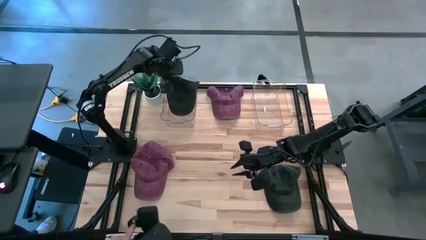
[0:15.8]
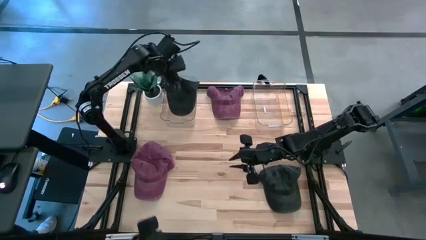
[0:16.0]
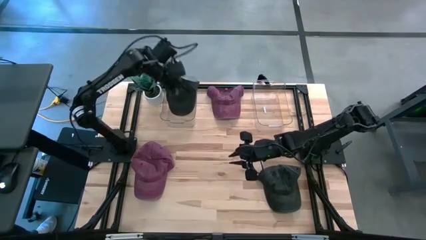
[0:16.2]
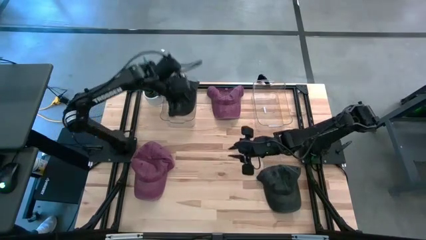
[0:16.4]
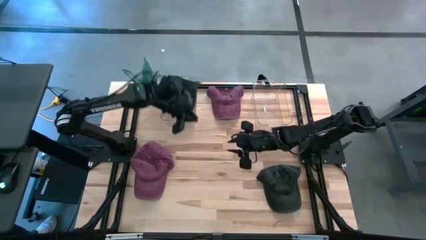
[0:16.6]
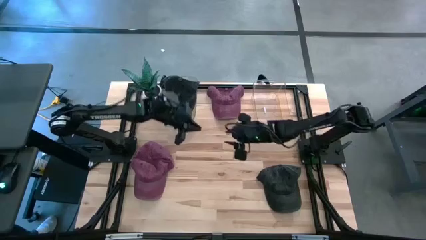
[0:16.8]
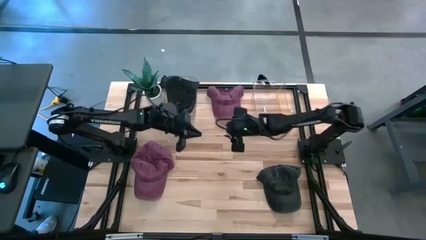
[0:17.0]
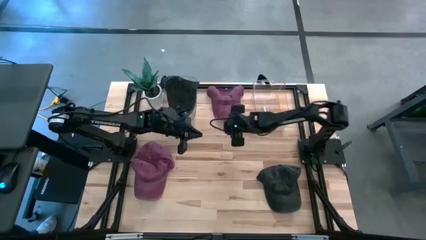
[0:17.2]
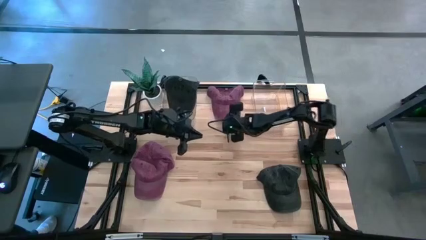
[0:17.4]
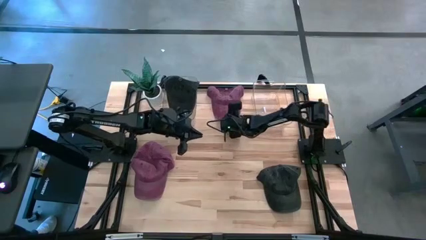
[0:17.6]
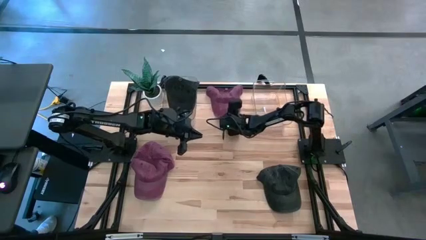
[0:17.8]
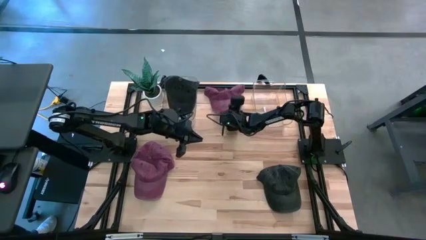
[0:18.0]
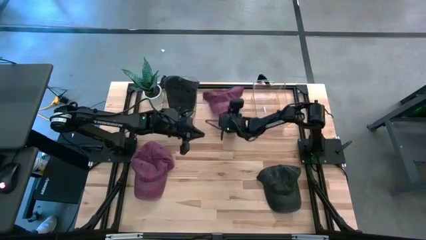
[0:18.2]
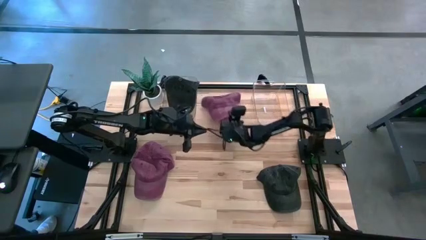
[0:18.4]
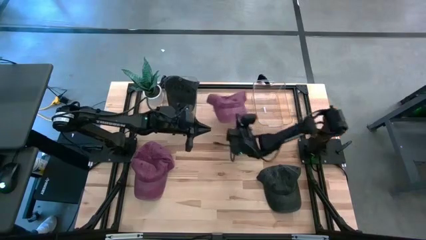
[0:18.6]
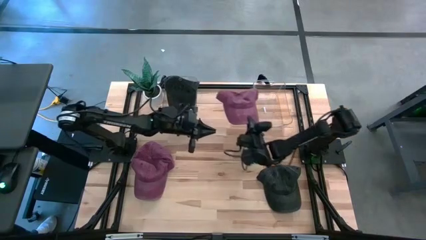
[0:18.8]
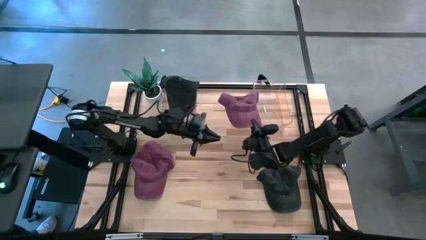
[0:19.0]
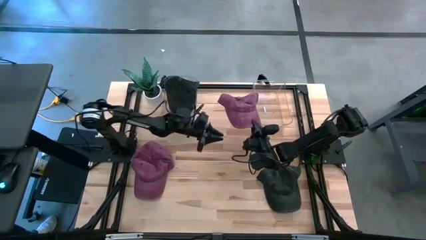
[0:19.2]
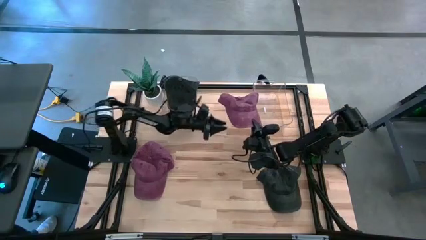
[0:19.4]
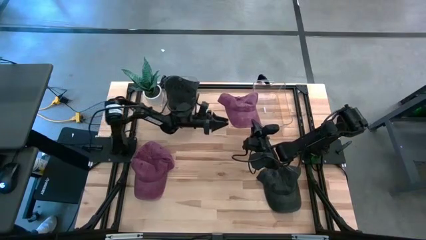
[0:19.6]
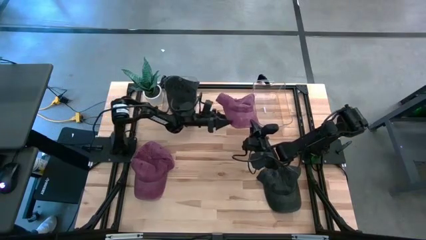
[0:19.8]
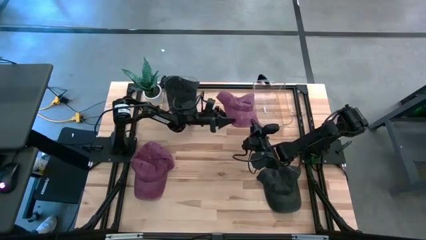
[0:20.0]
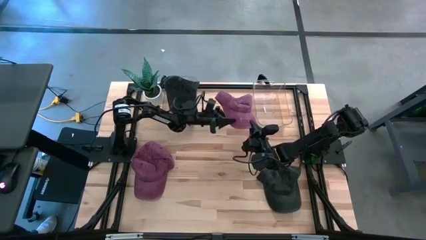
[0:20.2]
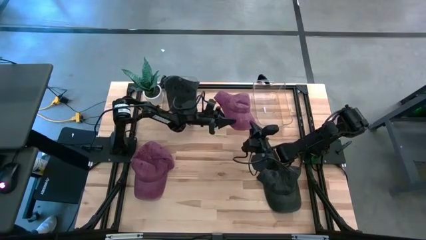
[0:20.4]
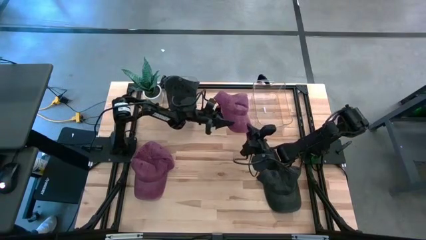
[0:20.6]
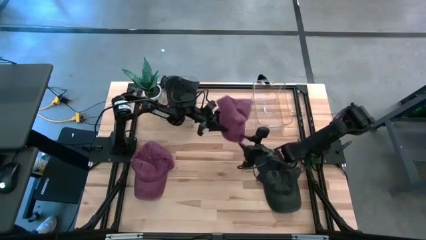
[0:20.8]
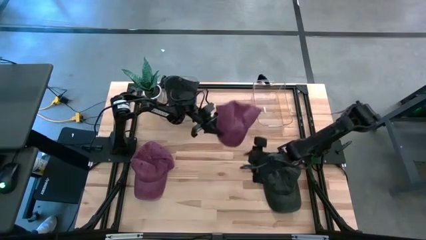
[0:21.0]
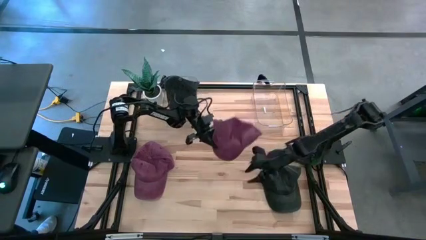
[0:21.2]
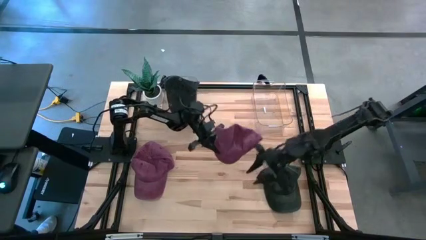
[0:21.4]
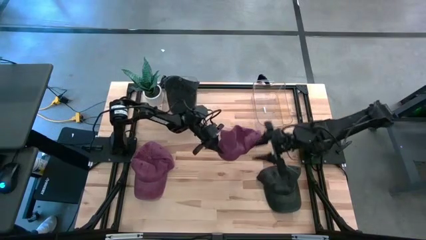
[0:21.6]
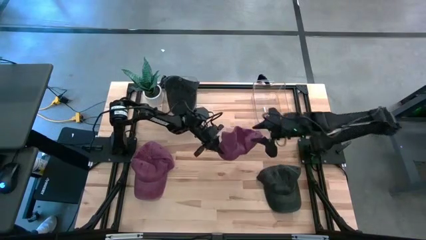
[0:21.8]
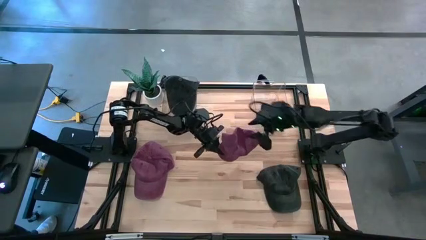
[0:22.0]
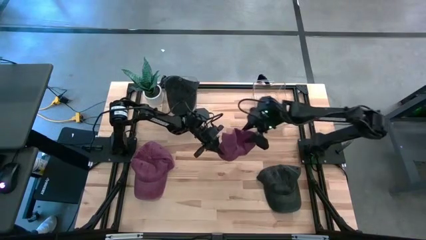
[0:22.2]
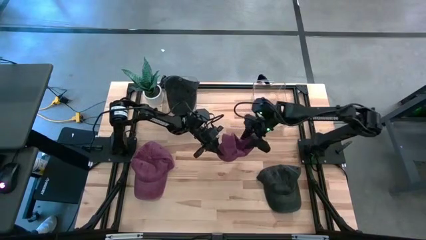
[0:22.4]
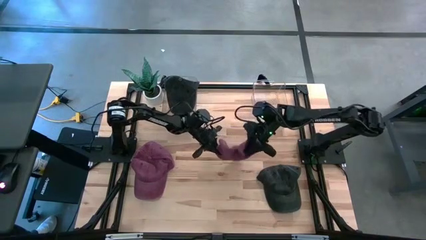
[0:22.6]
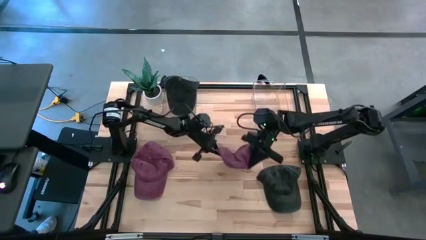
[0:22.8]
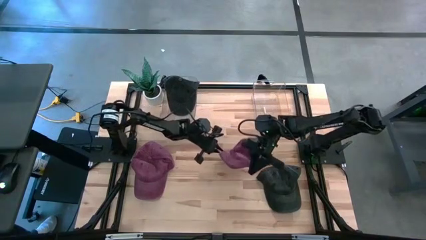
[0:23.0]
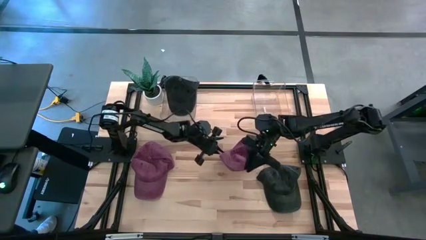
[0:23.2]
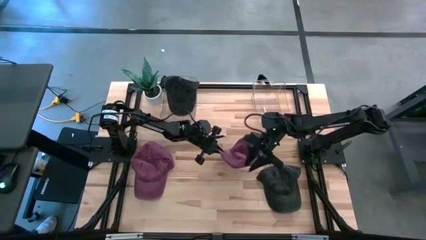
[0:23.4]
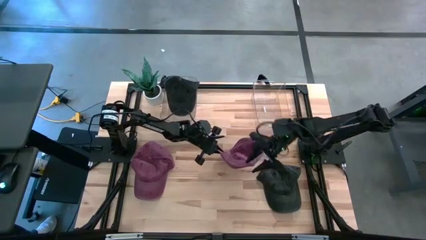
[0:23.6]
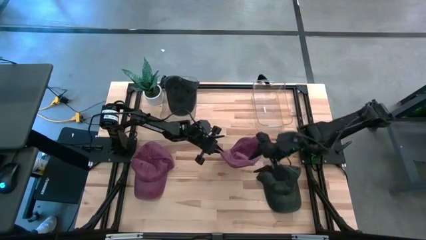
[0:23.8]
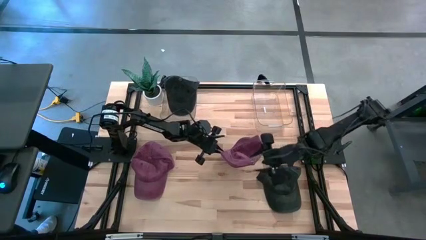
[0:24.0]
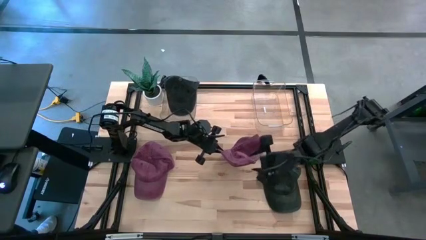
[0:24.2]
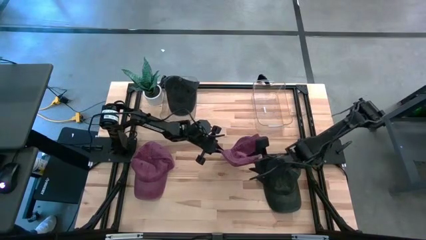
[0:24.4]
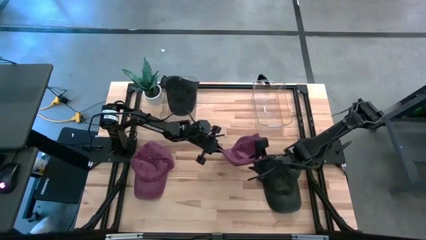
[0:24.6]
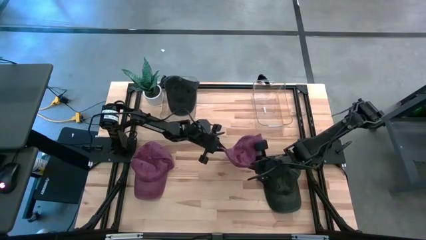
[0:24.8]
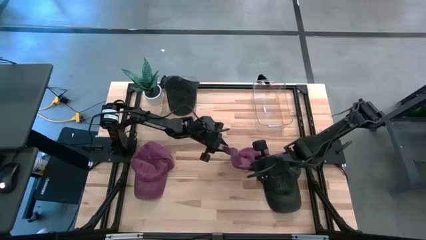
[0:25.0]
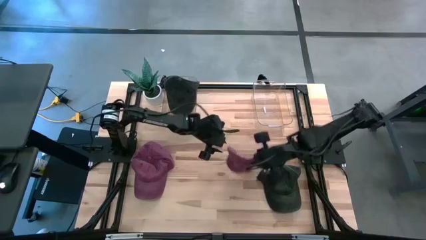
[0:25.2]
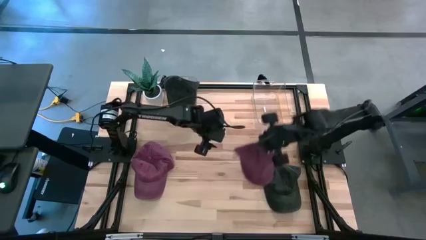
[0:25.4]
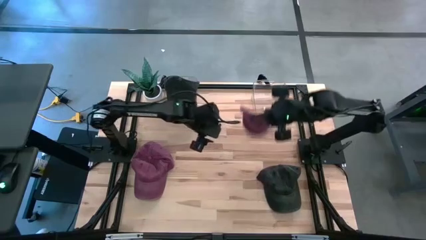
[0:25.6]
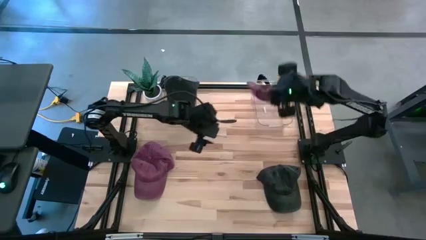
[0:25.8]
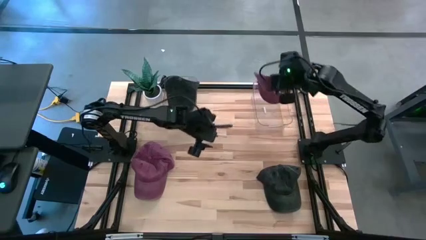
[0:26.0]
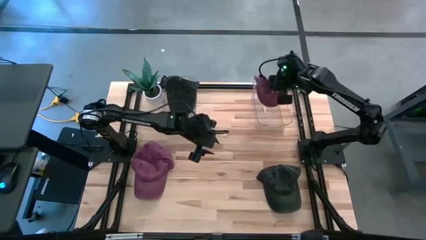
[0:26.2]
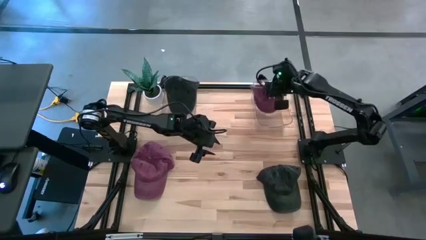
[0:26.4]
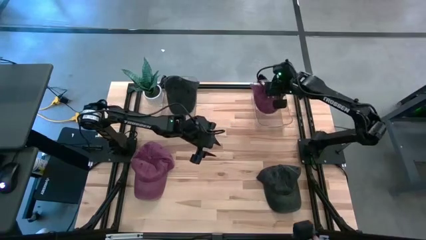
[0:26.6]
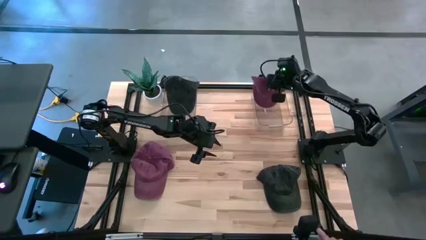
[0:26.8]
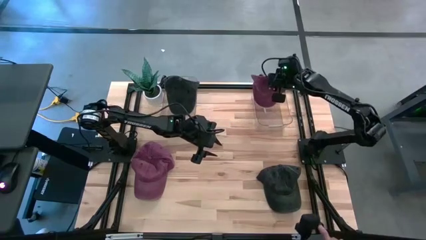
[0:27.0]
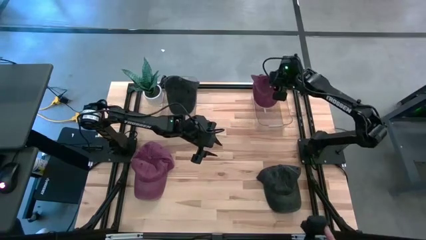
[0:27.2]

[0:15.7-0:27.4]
Task: Pick & Place hat
Put the top red cap into the right transparent bin

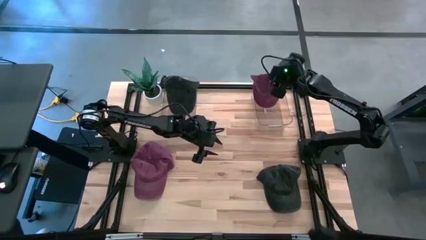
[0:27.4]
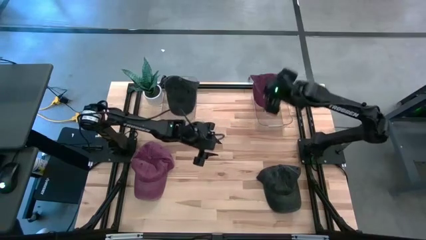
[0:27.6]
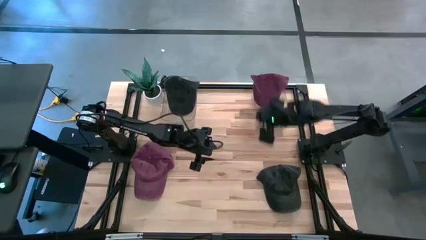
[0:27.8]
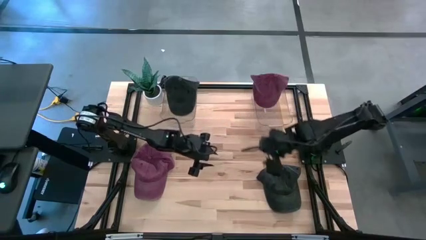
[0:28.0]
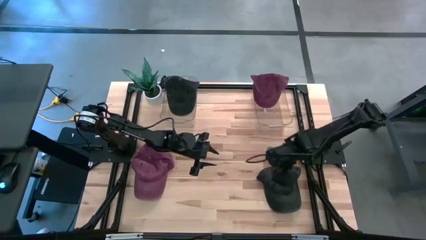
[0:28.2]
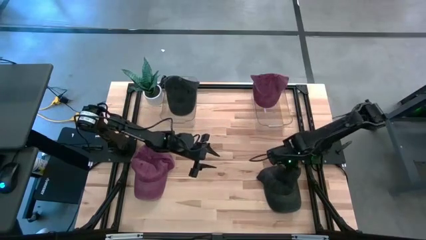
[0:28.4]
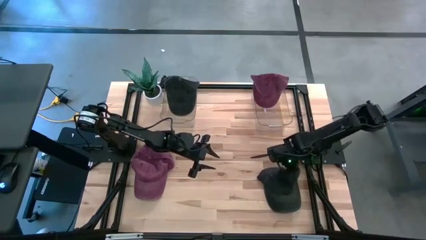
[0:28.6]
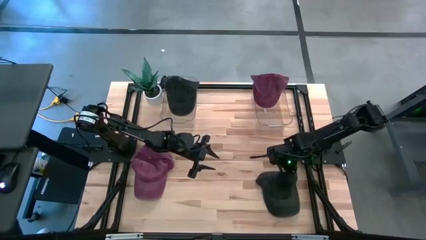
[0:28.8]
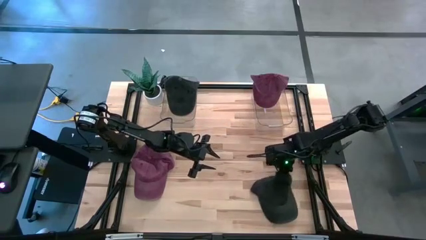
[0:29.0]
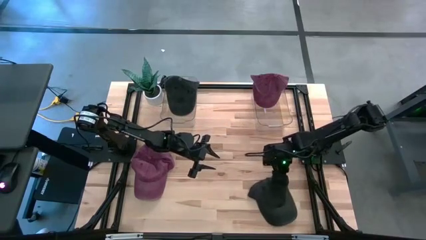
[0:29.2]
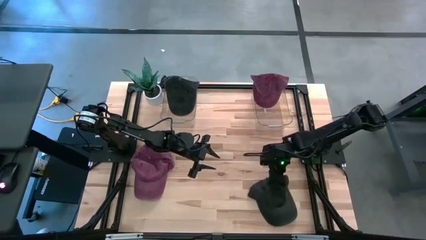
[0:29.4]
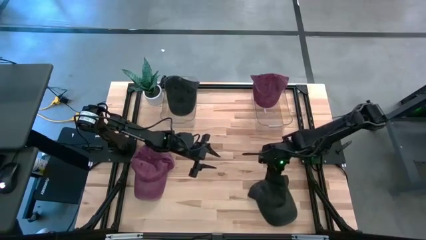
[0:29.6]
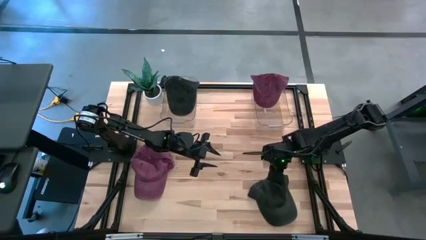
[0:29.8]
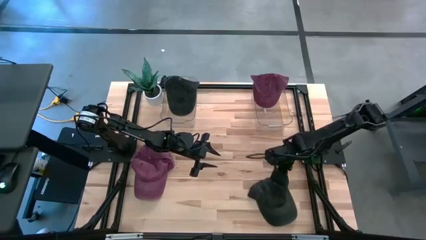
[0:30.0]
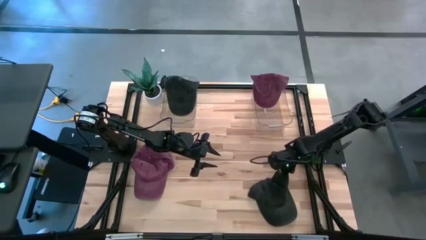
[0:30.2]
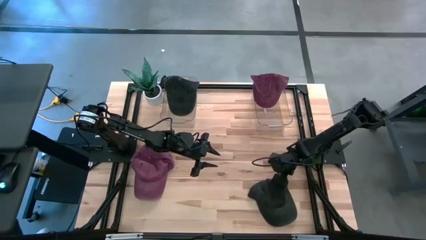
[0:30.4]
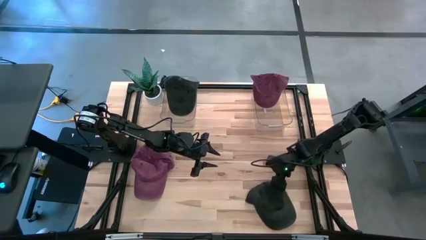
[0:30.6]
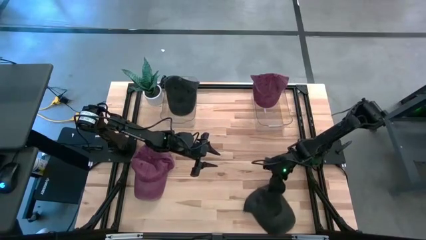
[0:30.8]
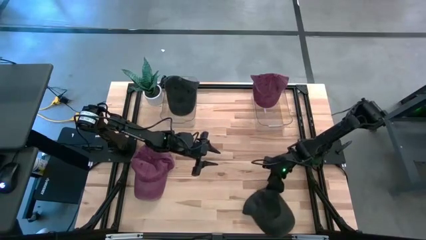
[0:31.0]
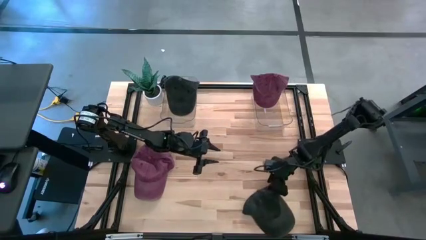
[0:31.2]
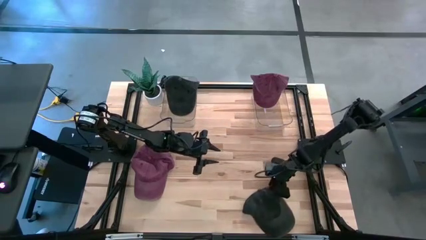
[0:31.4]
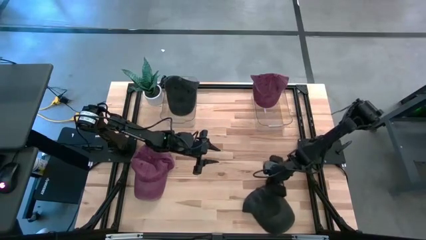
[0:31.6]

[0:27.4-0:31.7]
Put the black cap into the left transparent bin
